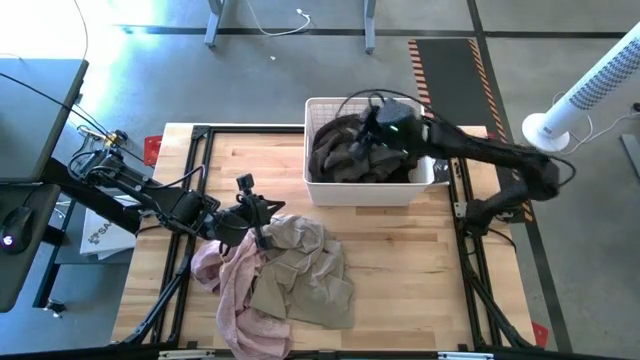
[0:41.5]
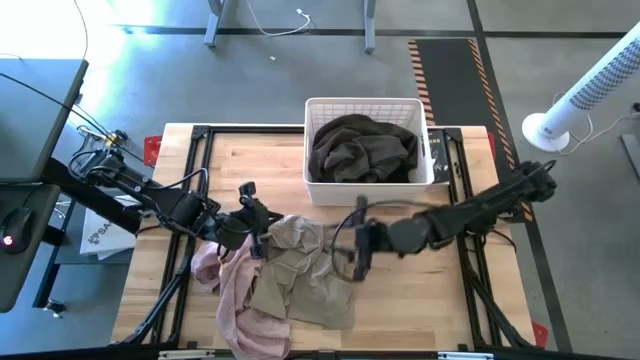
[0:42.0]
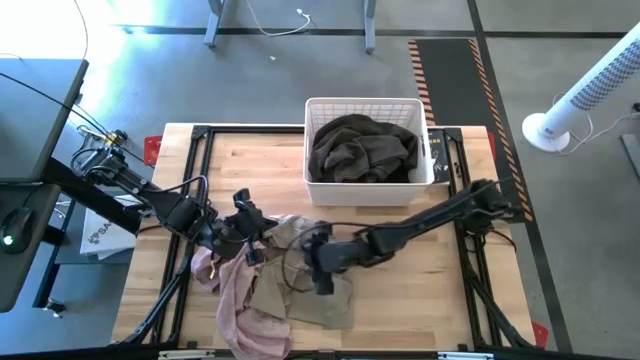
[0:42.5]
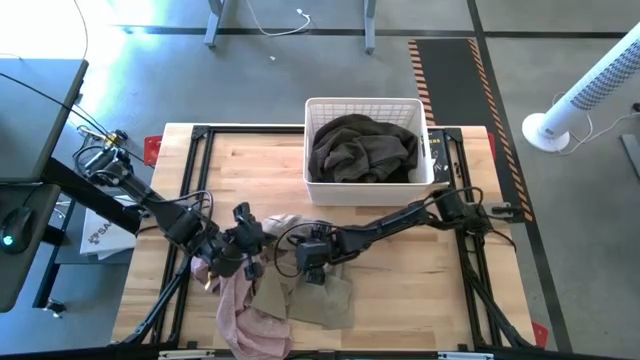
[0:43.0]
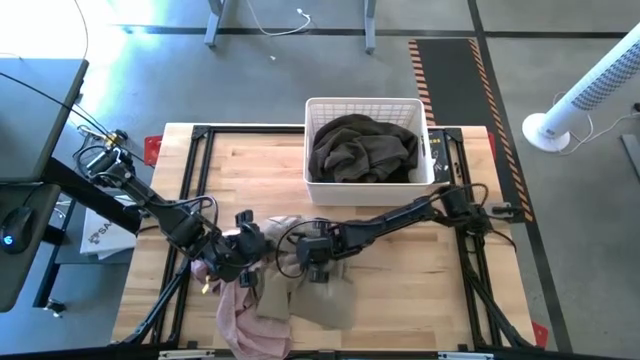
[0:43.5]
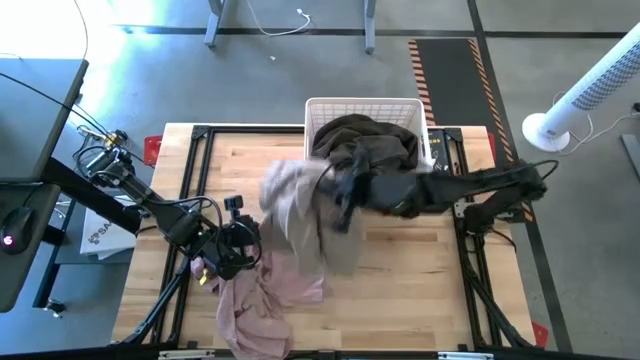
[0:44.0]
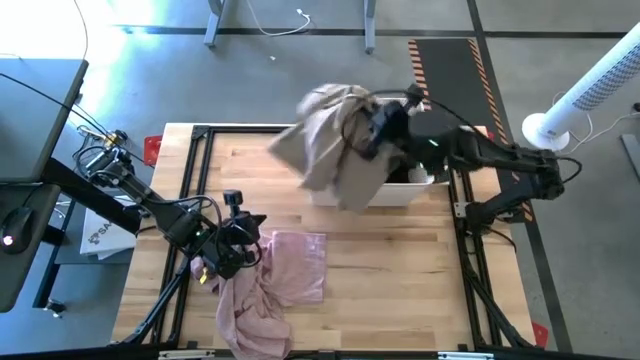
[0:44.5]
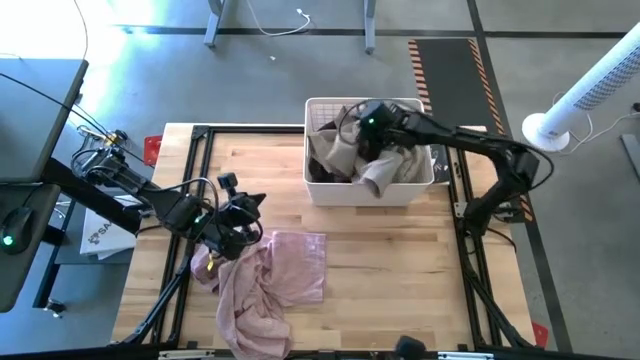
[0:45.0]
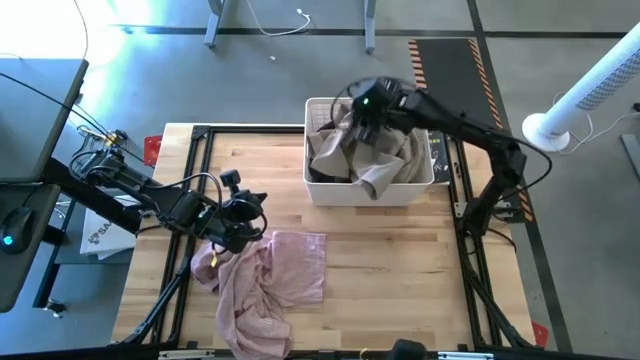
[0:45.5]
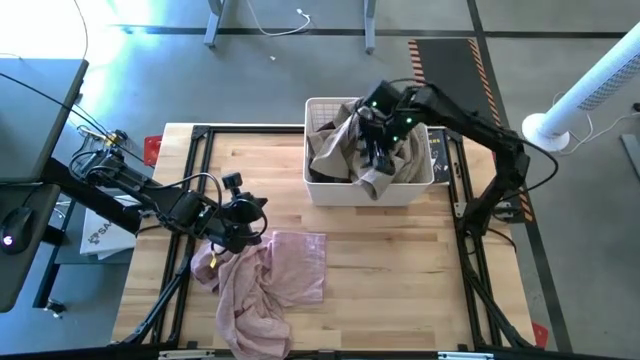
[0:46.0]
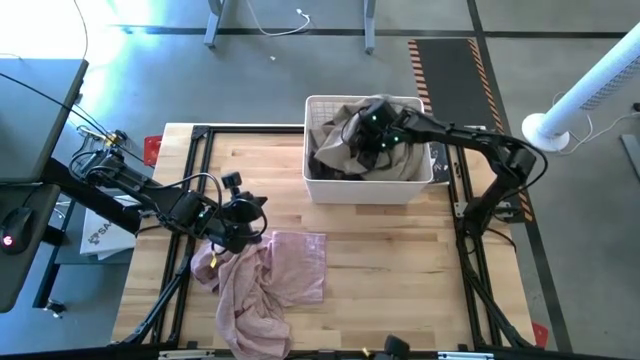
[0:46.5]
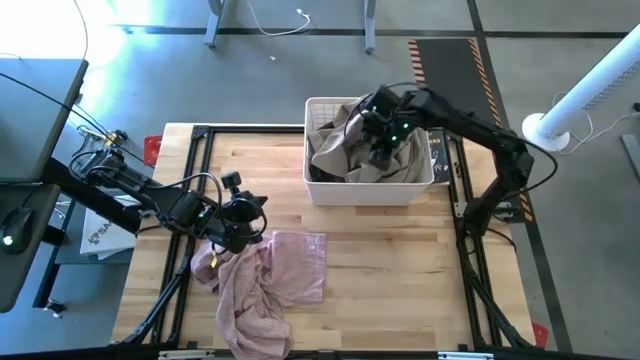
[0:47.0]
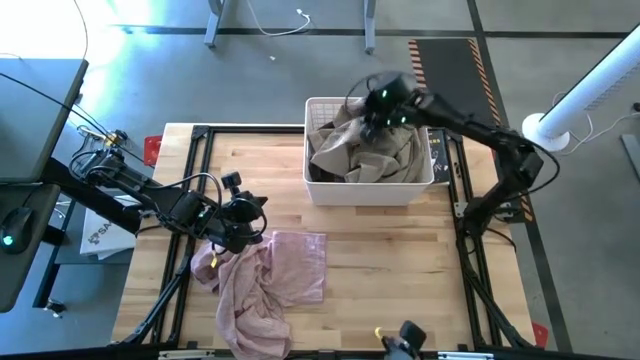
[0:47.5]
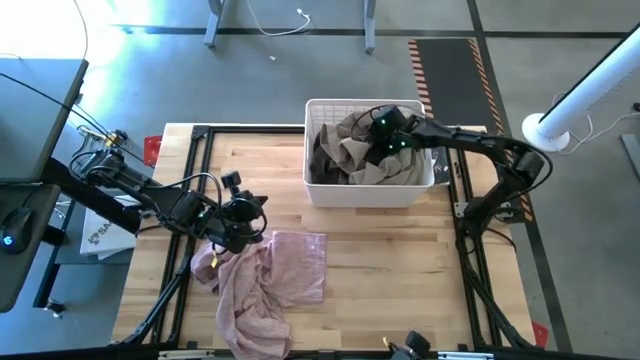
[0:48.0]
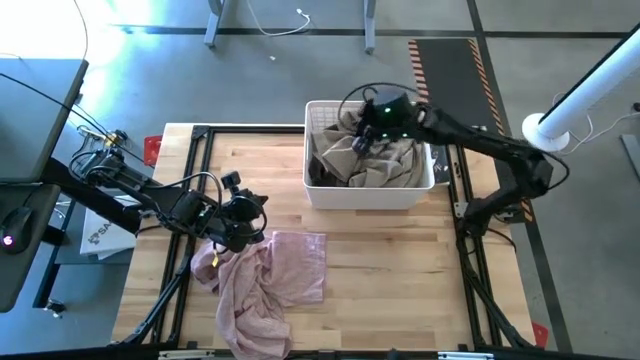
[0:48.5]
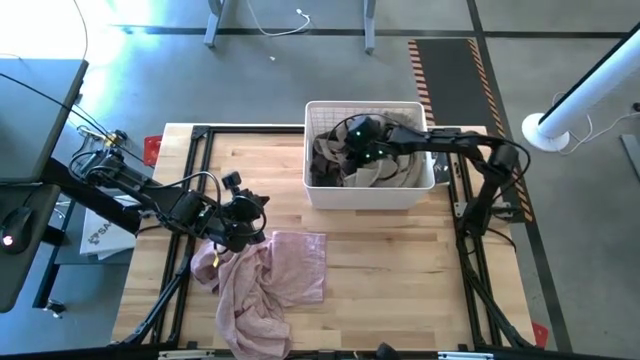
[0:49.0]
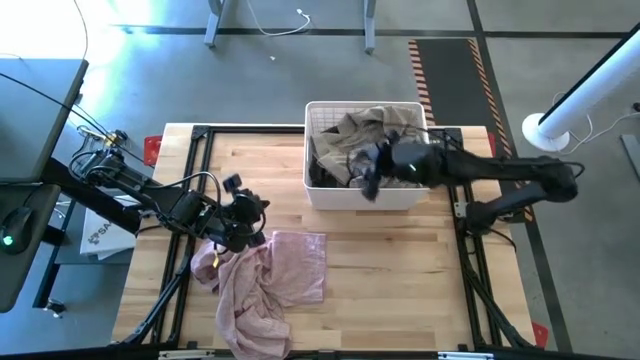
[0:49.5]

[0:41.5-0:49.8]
Task: Sort clothes
Put the light gray shorts into the laundry bin

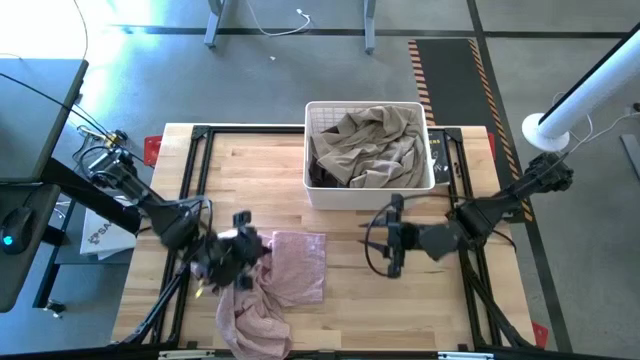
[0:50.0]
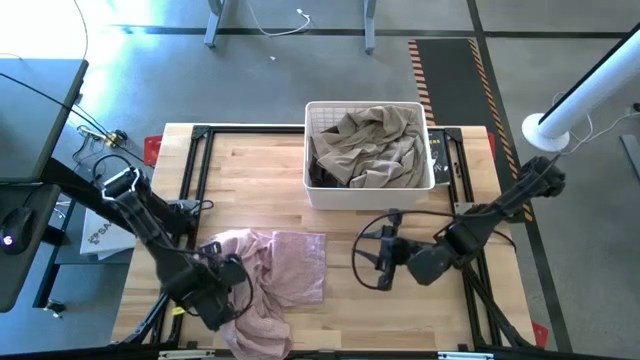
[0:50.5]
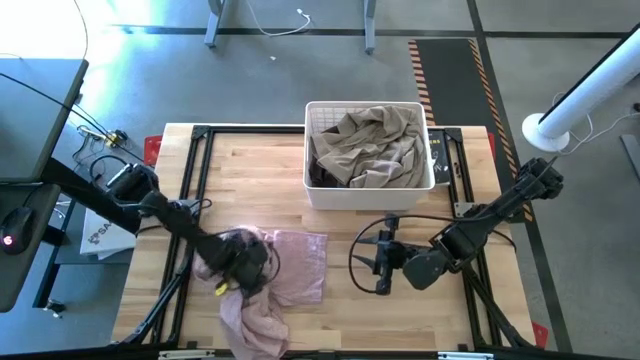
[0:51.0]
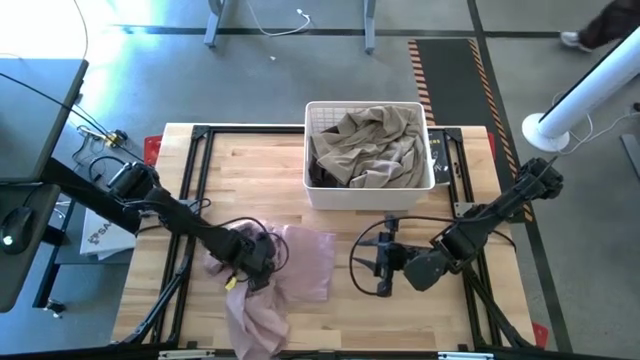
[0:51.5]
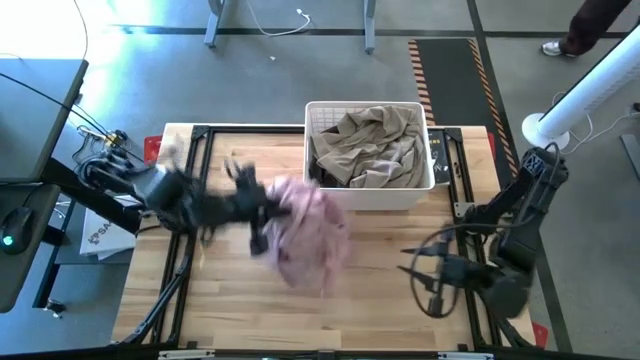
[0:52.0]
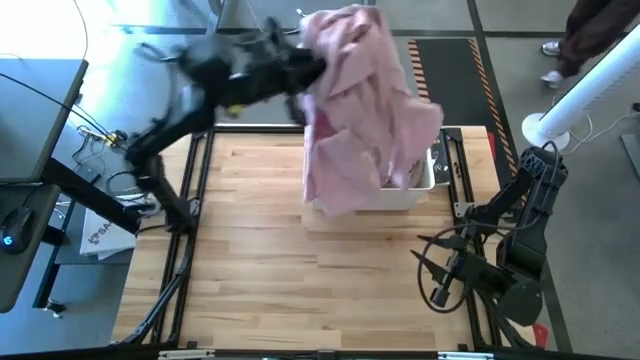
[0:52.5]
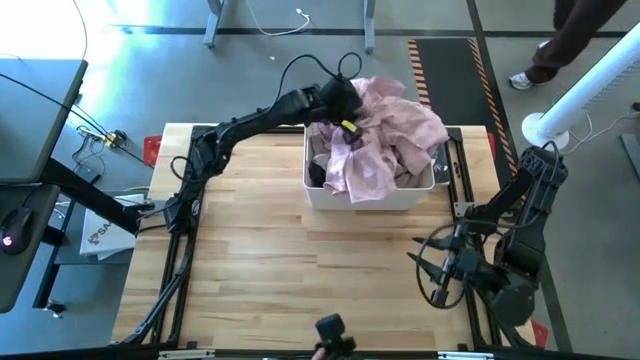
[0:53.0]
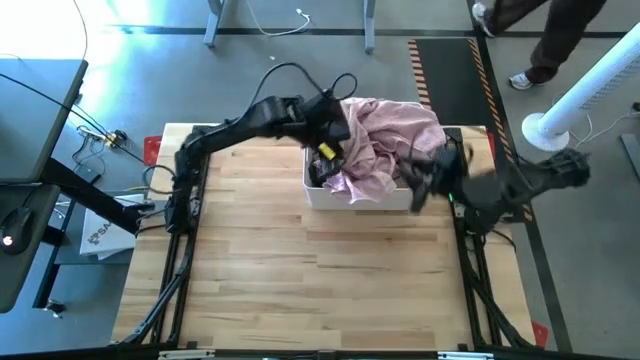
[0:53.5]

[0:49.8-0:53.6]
Put the pink shirt into the laundry bin

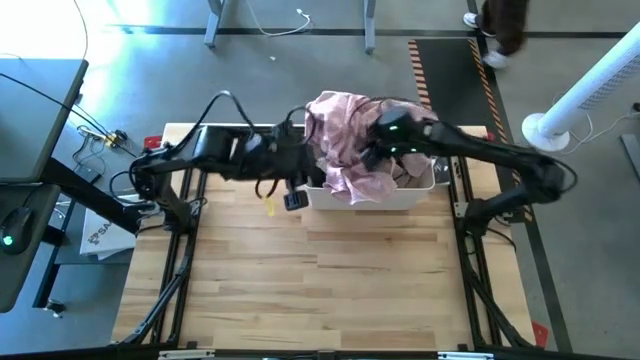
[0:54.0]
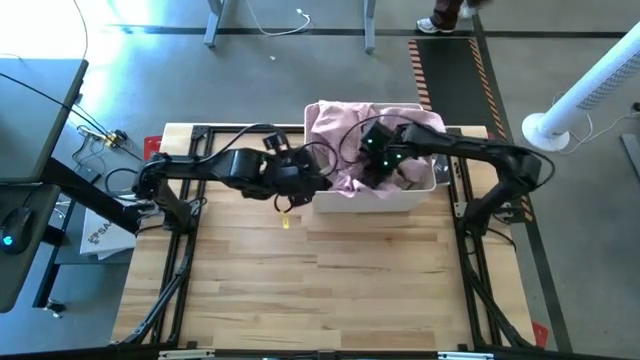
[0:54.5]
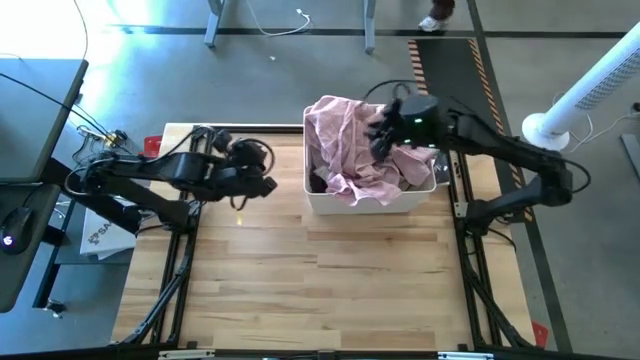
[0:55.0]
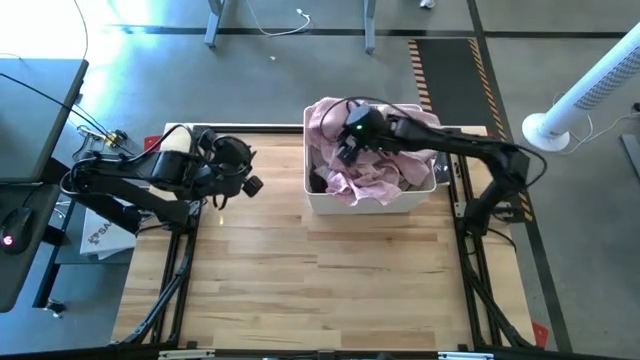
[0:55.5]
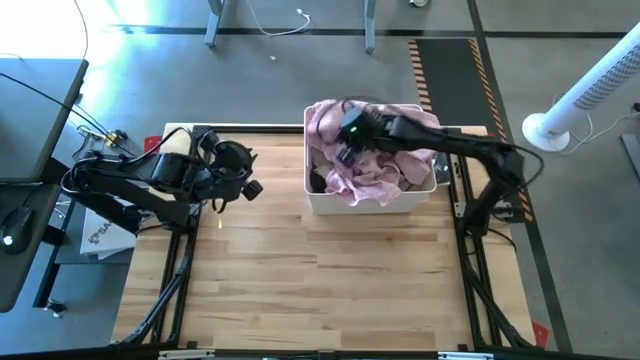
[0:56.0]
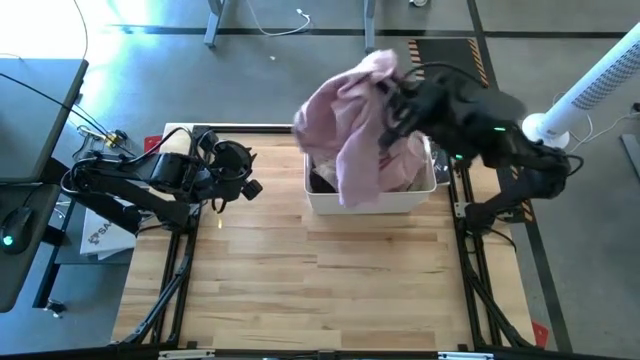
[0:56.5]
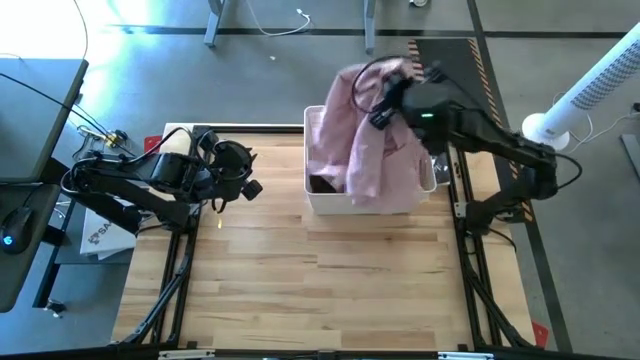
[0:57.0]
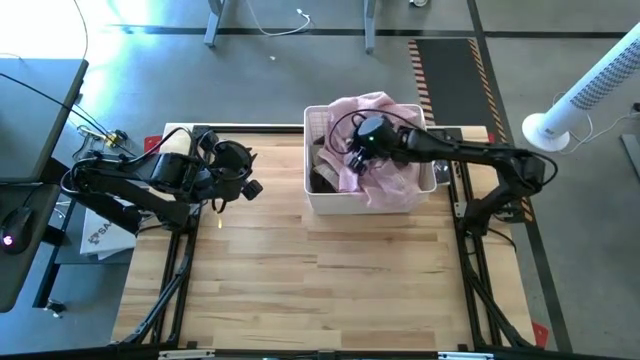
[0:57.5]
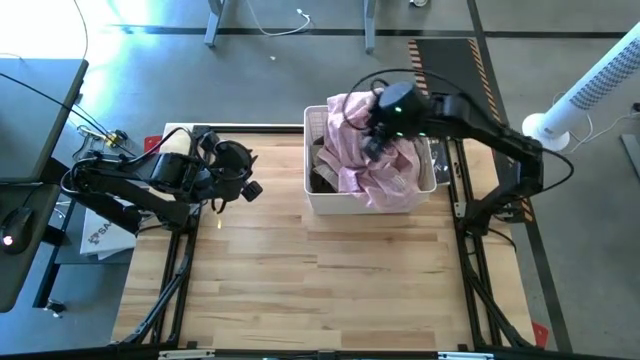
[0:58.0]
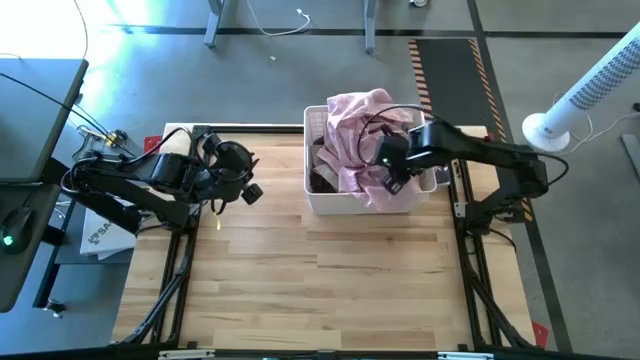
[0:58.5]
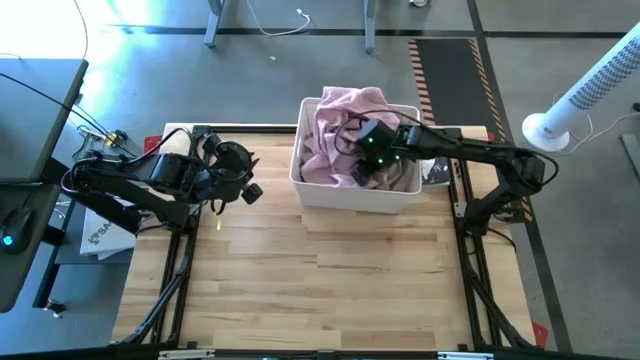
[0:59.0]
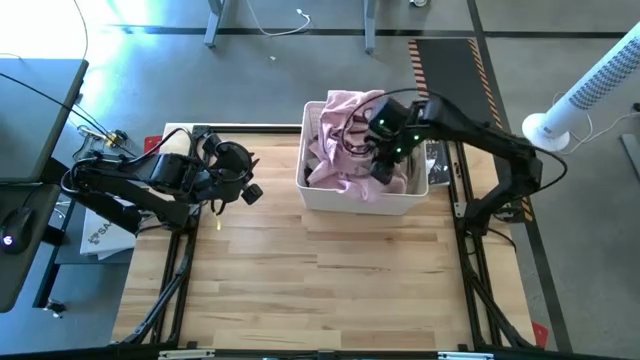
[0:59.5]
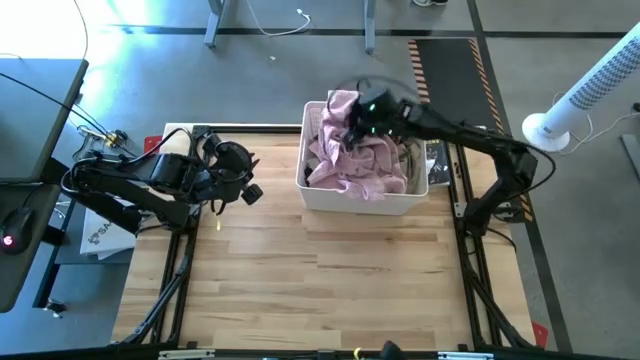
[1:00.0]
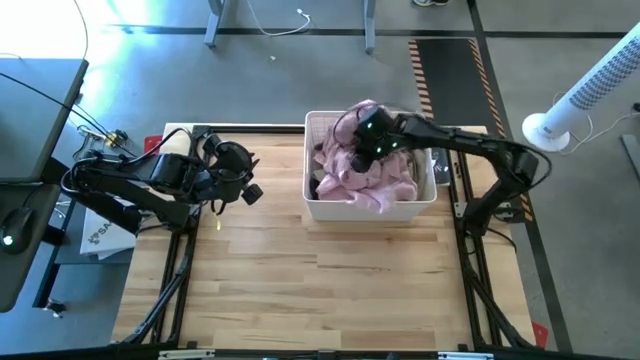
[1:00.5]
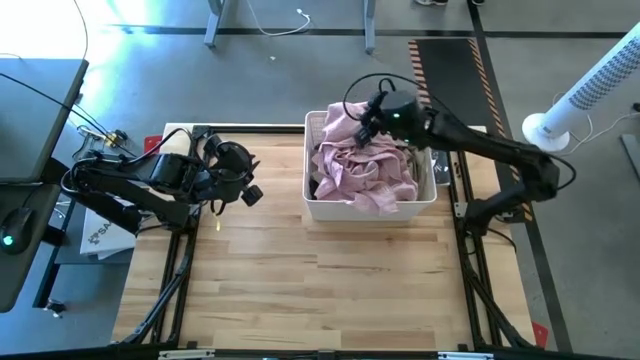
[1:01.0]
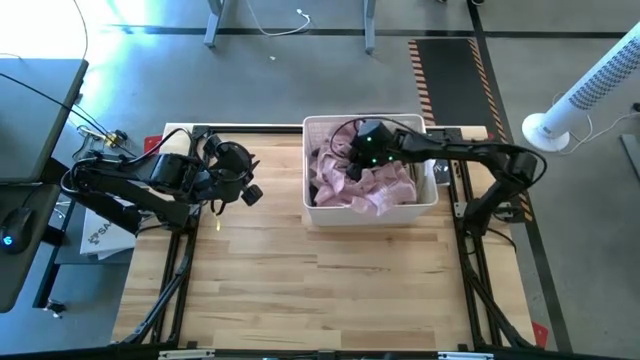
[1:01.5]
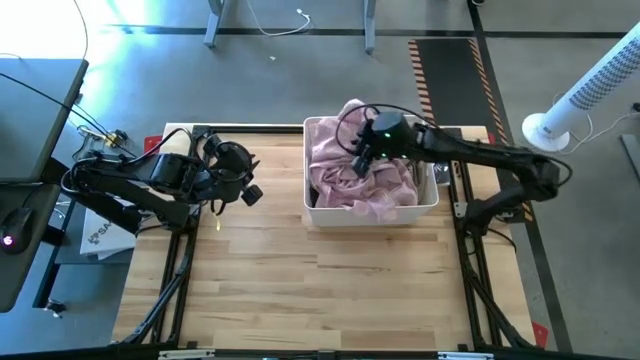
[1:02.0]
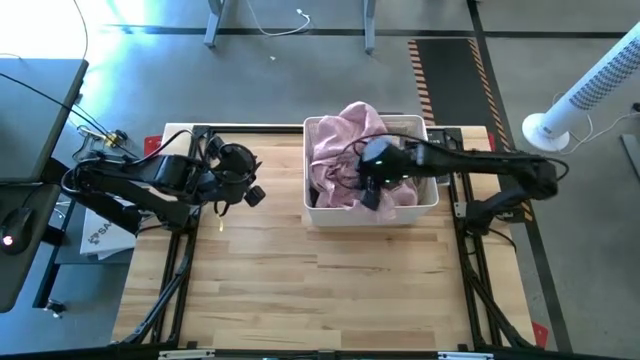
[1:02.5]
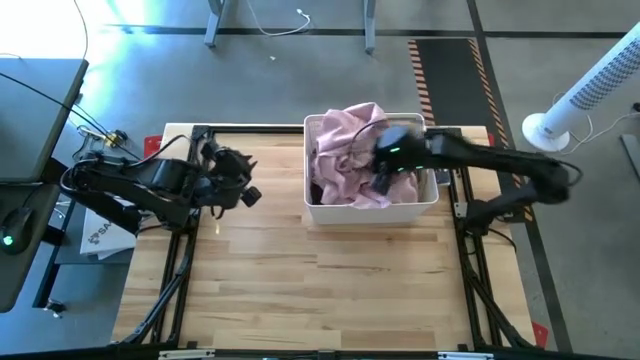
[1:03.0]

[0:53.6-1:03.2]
Put the pink shirt into the laundry bin
